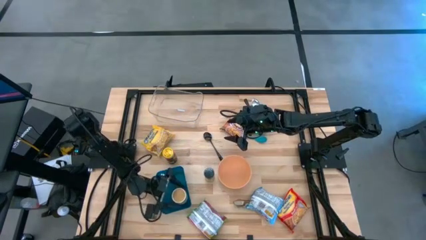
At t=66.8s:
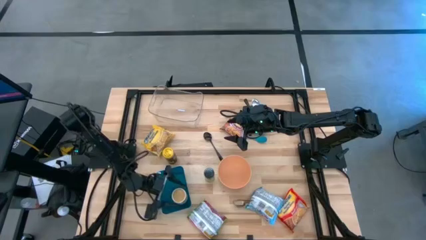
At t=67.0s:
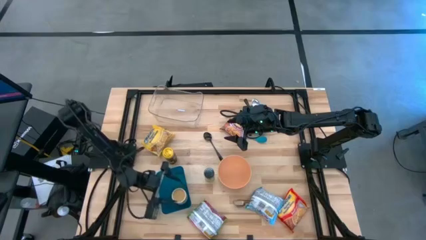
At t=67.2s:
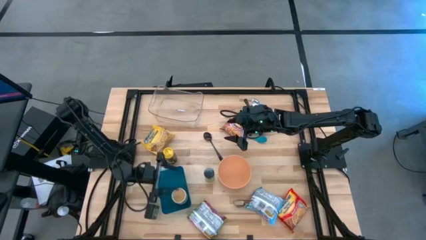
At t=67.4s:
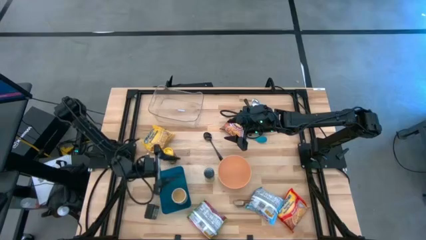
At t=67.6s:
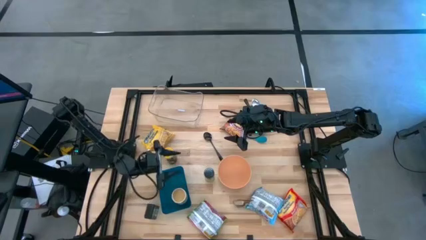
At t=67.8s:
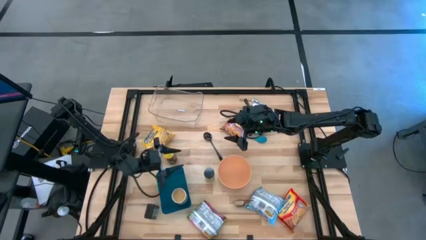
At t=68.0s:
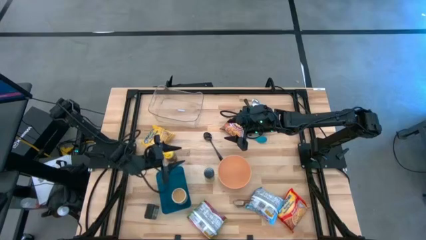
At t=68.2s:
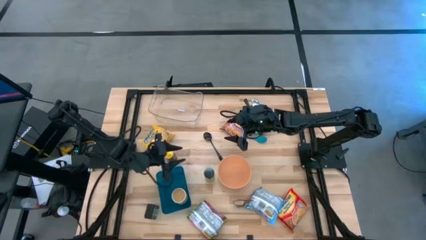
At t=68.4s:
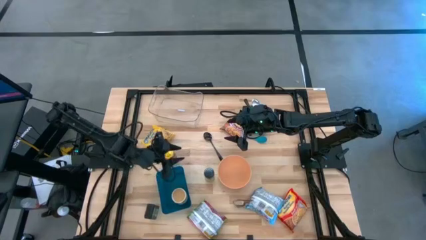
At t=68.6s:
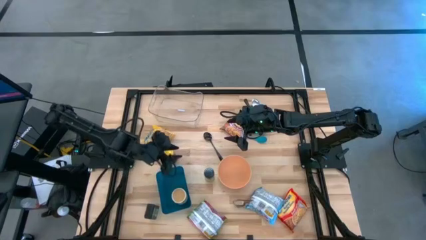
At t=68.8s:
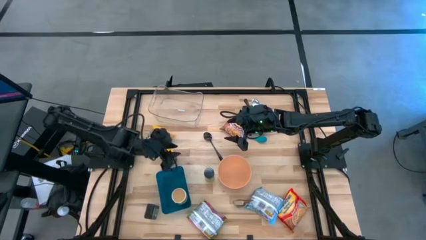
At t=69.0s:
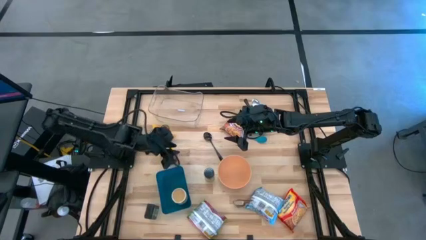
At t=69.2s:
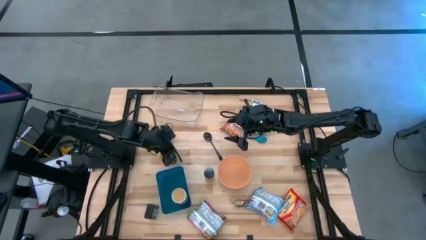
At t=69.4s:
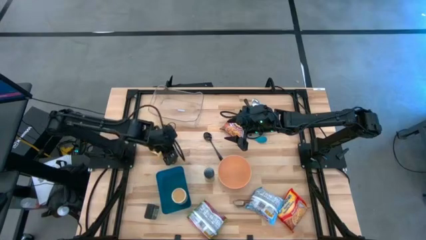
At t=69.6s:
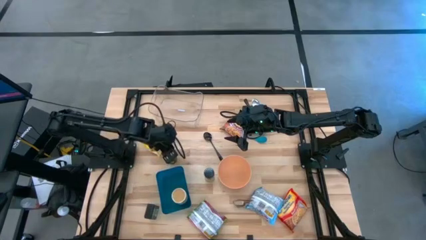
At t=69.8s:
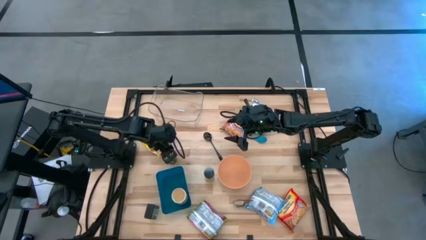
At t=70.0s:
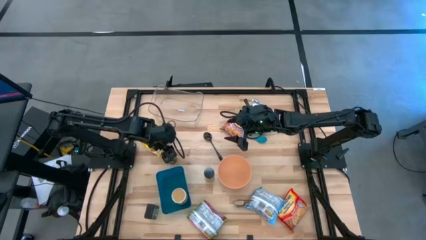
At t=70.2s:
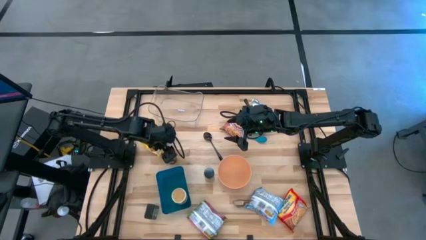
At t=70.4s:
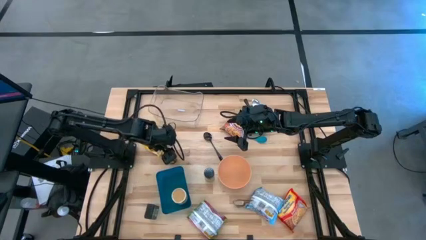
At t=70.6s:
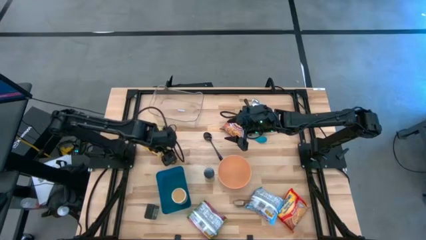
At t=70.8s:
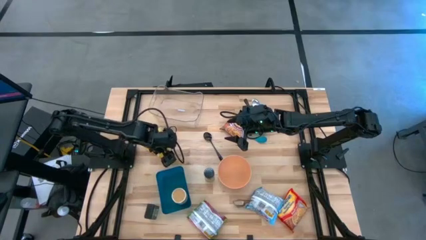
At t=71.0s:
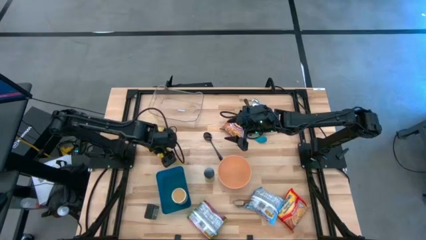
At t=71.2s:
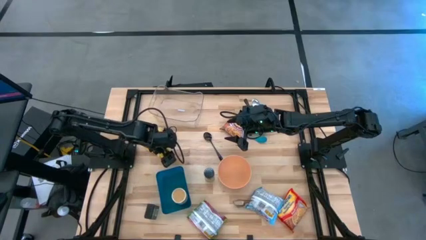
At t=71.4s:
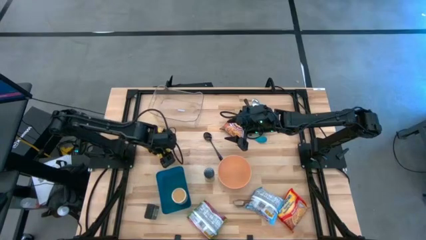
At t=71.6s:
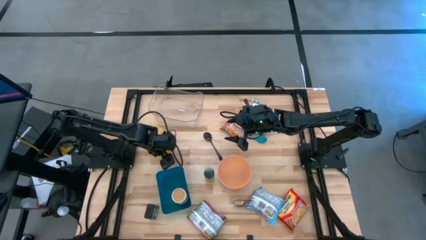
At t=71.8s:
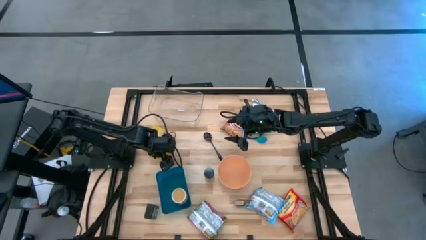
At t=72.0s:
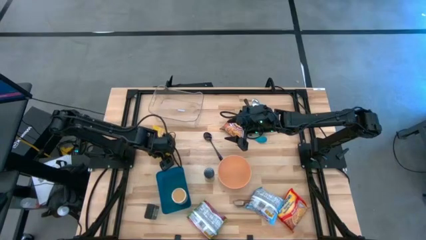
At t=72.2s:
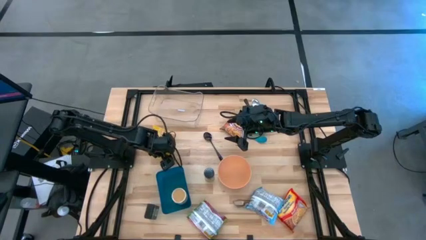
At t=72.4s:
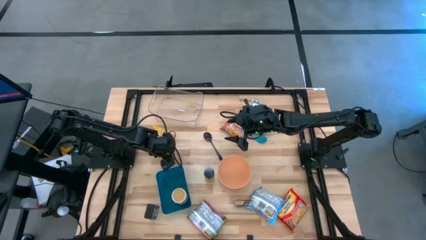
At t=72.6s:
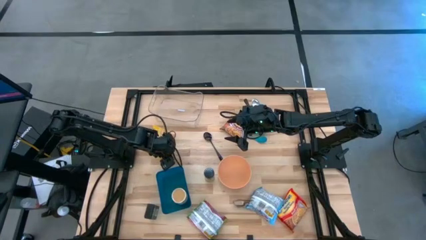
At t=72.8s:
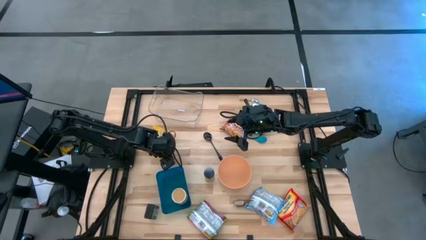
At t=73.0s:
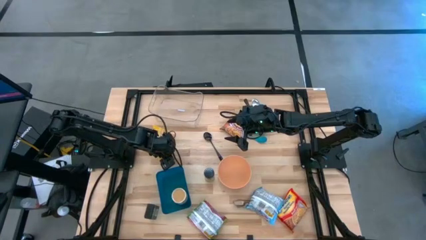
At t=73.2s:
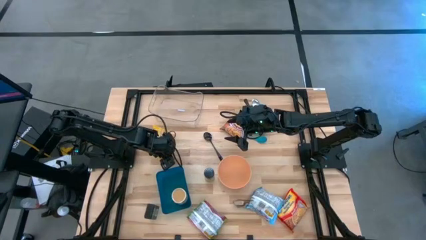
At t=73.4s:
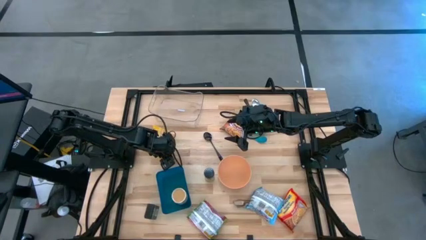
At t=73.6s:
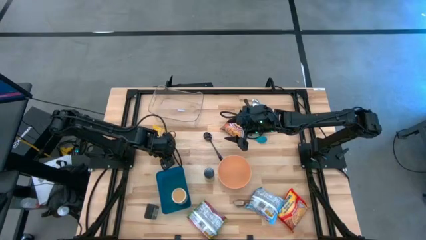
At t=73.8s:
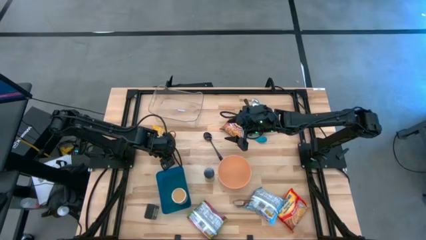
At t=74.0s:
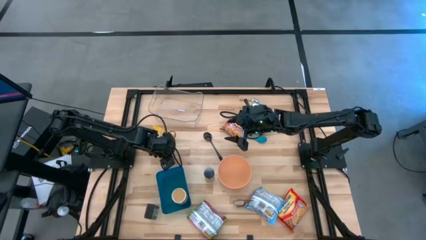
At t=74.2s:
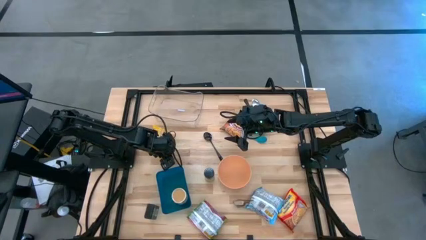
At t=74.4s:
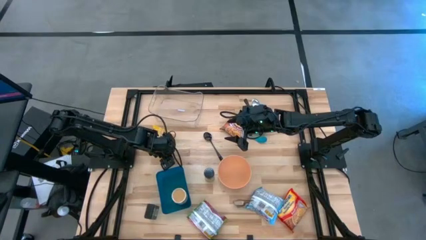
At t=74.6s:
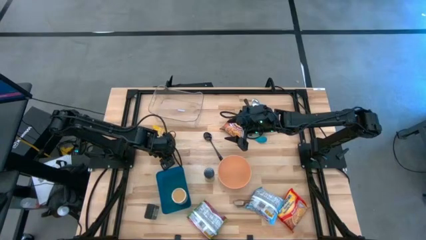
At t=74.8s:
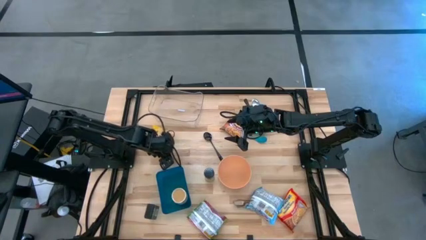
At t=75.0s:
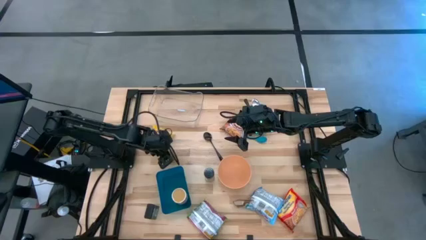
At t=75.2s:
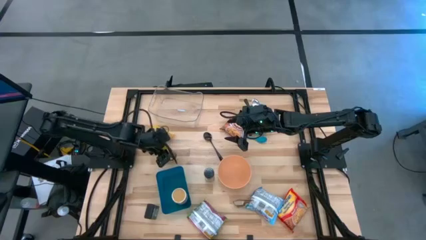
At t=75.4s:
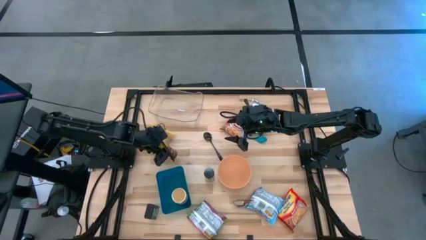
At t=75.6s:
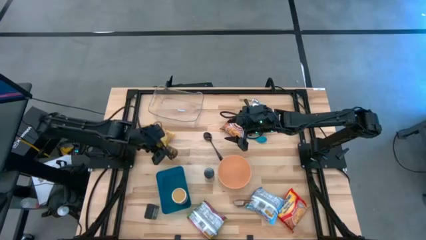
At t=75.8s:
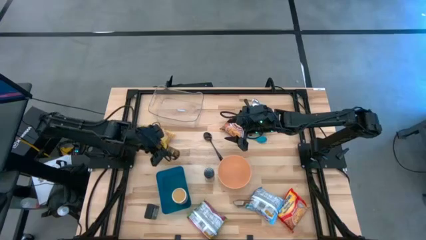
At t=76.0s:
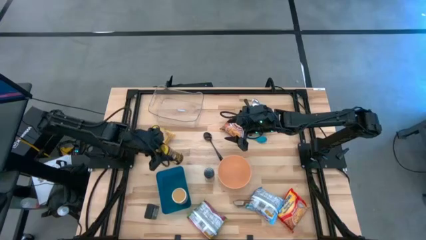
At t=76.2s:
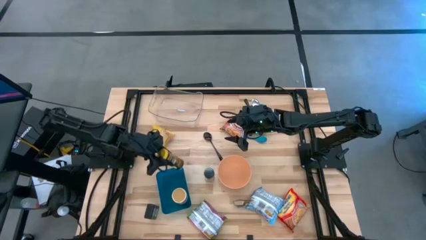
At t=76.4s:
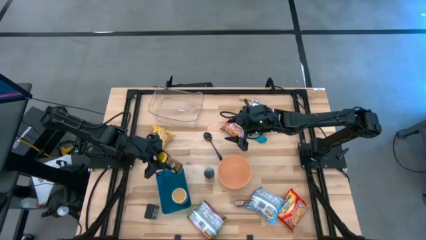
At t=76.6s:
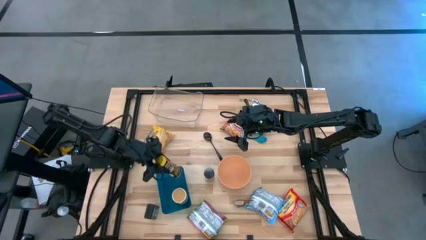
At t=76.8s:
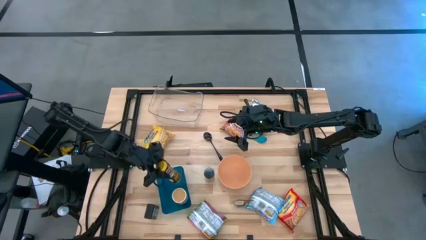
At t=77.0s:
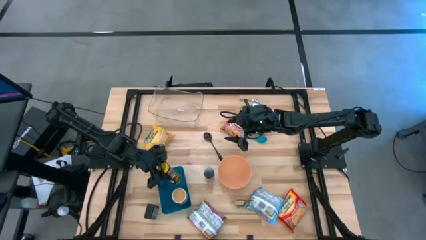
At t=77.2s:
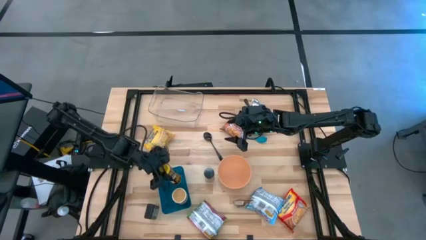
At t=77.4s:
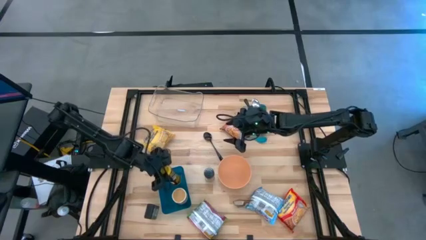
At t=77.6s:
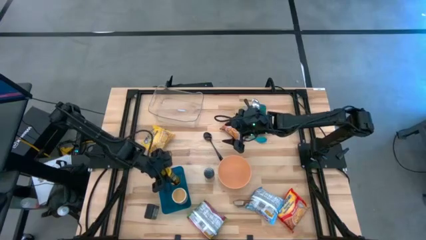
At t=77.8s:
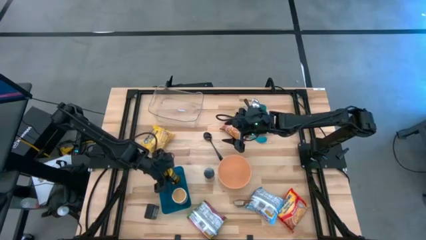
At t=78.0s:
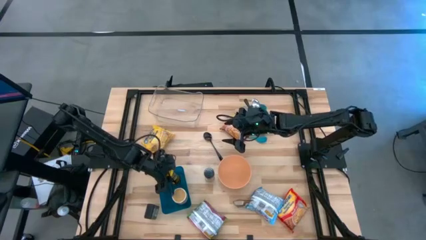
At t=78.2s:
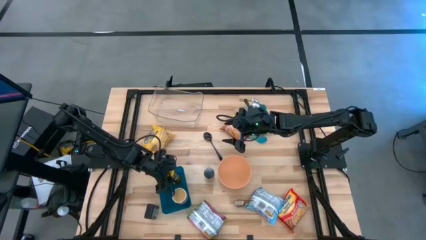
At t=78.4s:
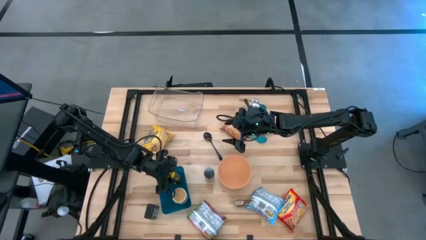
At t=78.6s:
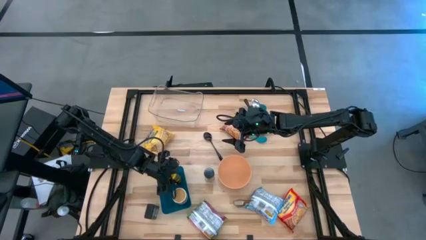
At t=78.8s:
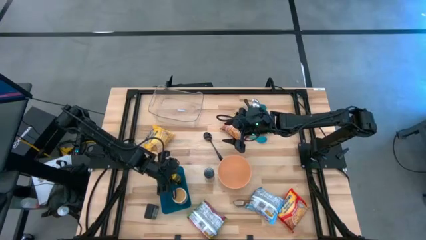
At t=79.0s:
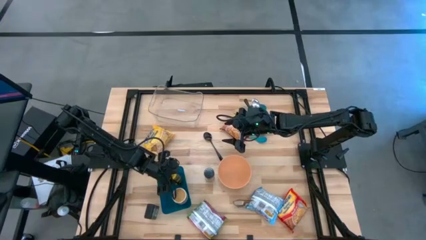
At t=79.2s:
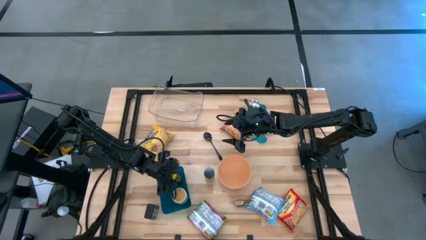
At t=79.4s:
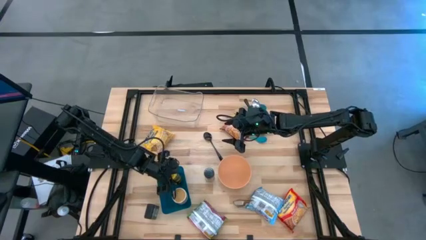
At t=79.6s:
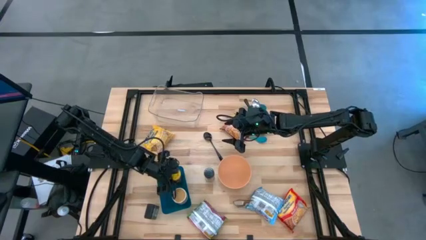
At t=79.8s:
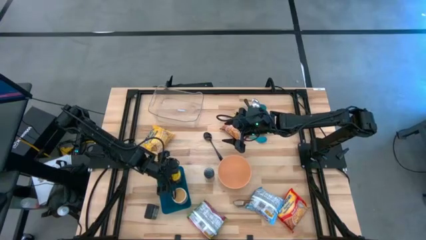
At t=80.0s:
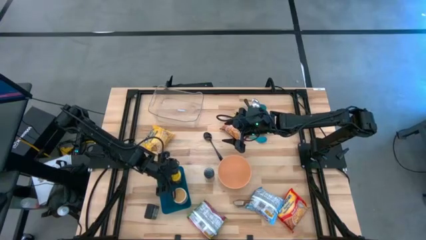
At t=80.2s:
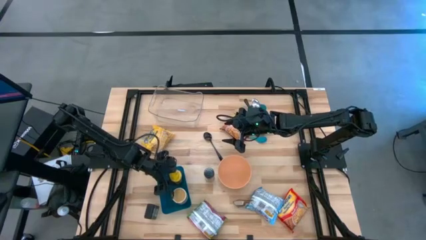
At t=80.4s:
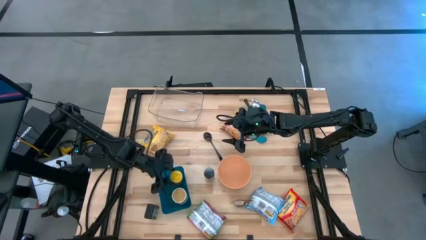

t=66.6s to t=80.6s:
Task: Pick & Place Food Item
Put the black seasoning bottle into the blue bin

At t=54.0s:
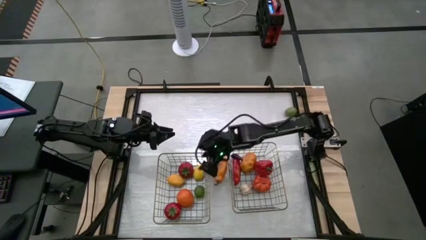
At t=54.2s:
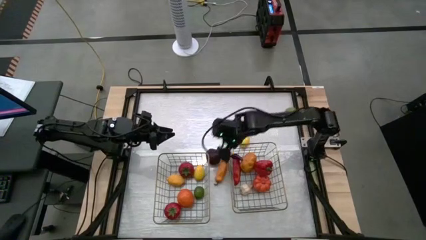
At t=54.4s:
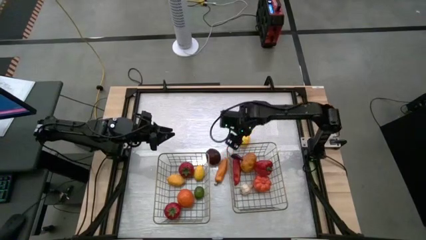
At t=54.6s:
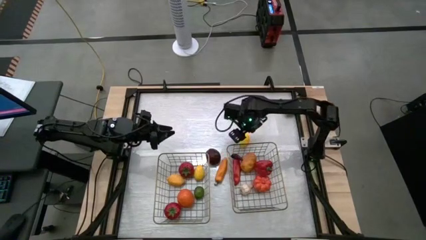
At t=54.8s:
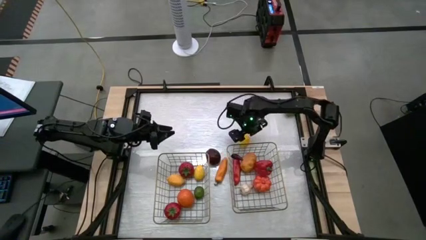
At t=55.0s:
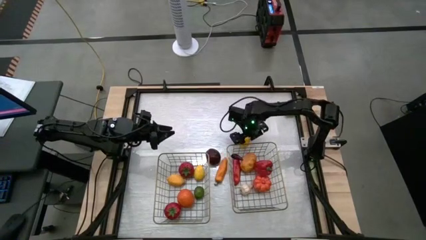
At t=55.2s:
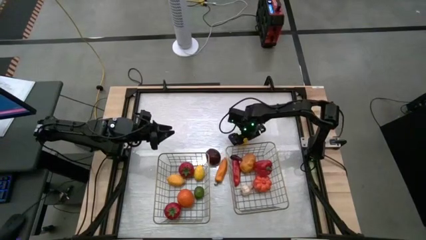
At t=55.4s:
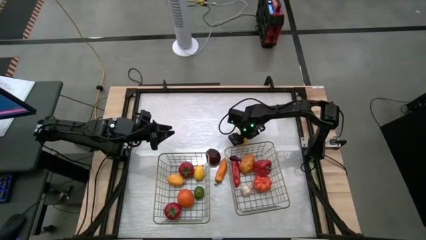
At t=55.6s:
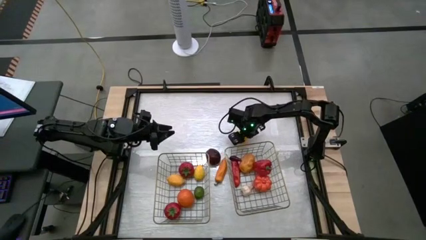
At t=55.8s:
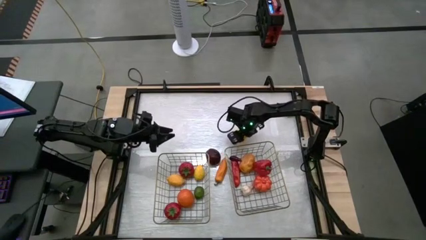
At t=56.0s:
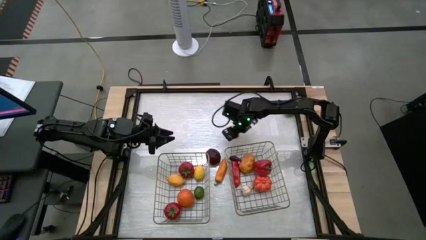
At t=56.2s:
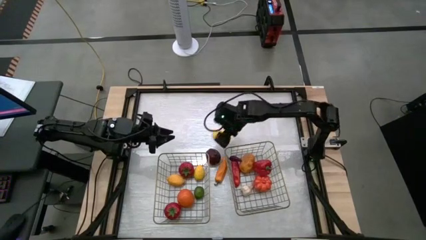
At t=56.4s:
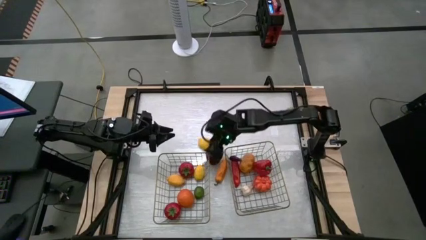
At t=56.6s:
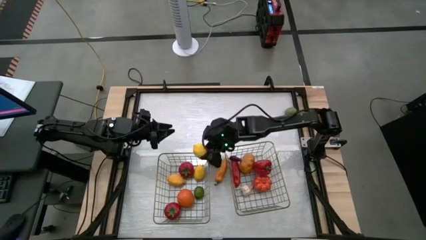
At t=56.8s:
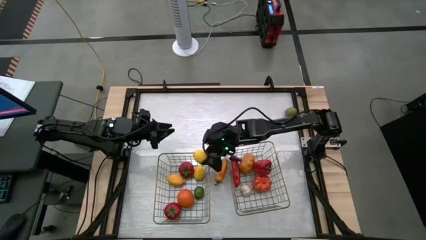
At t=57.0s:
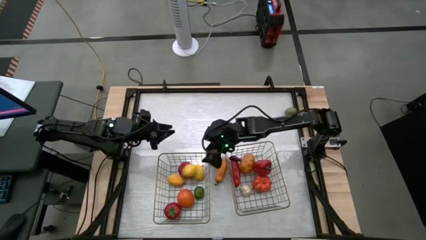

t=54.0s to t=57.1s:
Task: Sort produce into baskets
Put the lemon into the left brown wire basket
